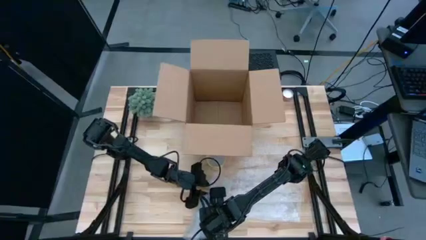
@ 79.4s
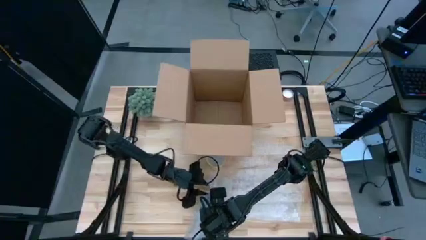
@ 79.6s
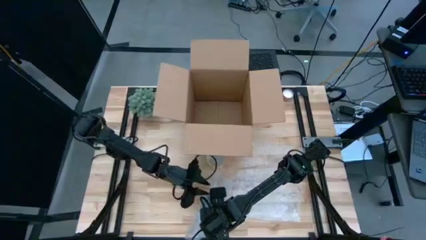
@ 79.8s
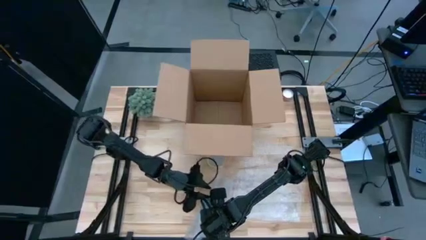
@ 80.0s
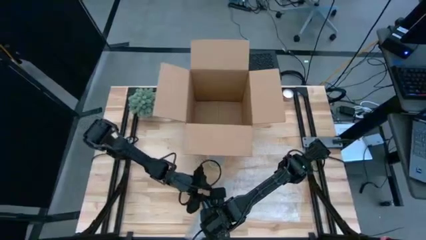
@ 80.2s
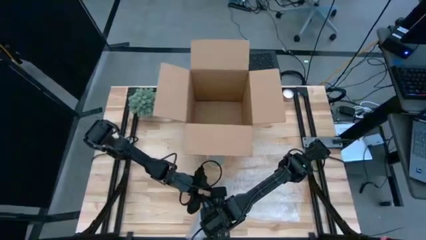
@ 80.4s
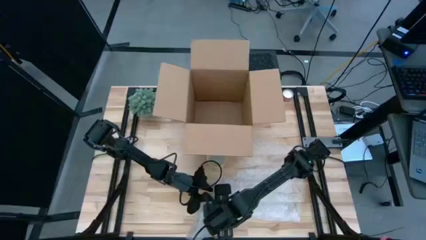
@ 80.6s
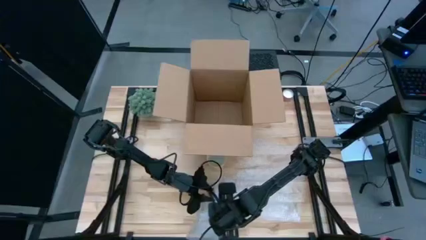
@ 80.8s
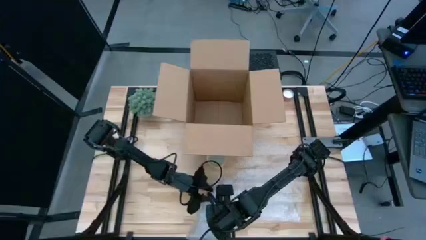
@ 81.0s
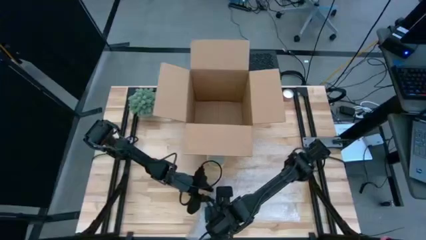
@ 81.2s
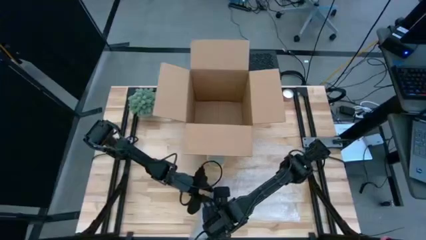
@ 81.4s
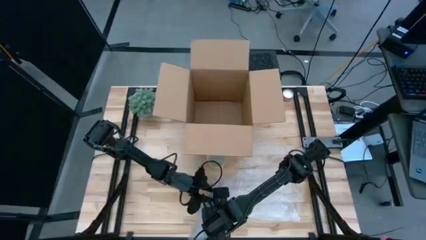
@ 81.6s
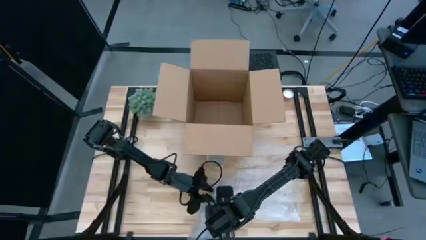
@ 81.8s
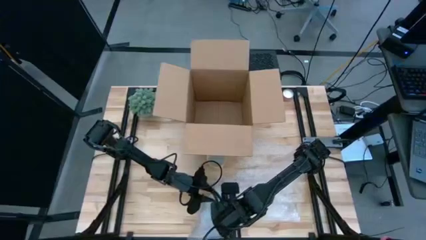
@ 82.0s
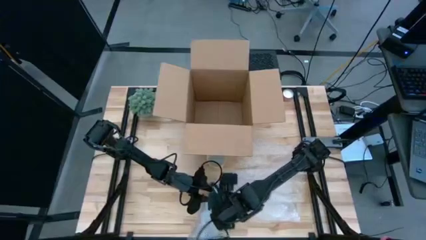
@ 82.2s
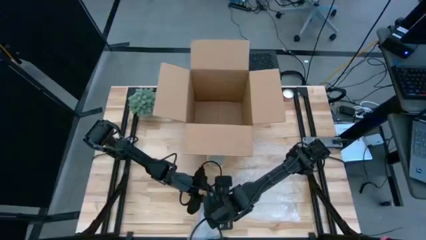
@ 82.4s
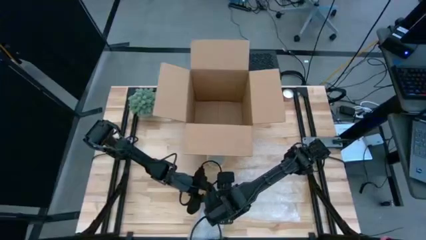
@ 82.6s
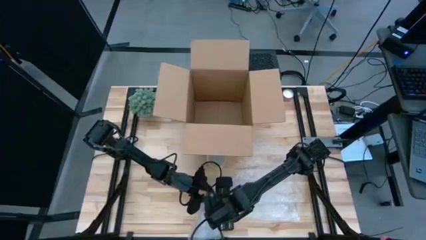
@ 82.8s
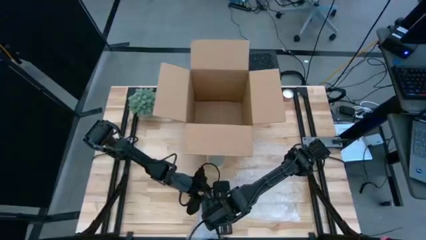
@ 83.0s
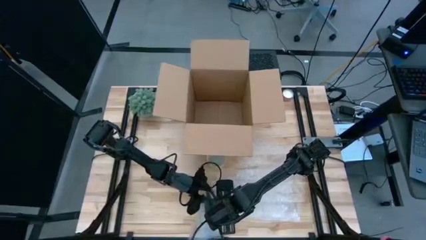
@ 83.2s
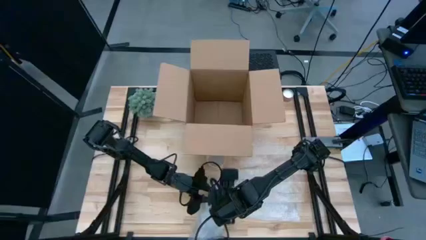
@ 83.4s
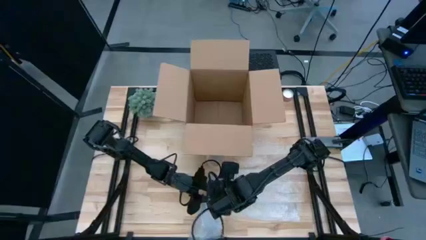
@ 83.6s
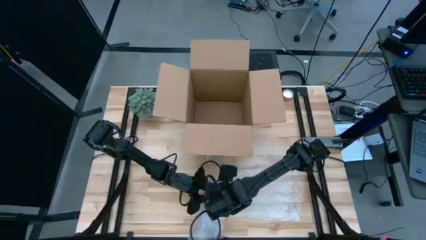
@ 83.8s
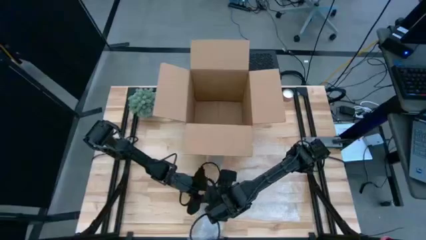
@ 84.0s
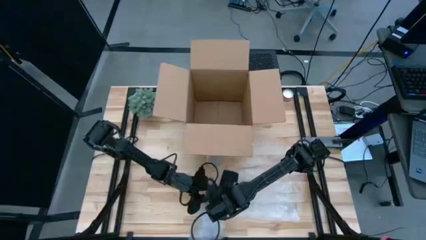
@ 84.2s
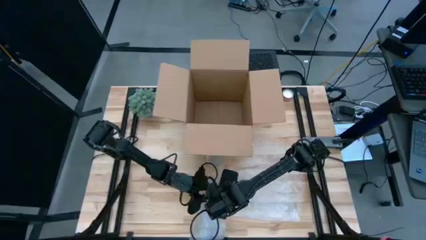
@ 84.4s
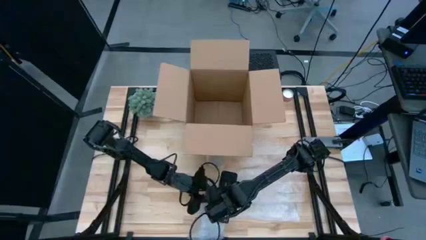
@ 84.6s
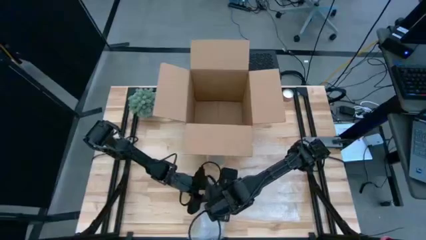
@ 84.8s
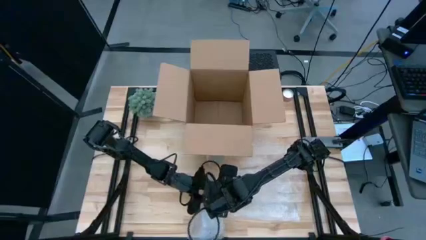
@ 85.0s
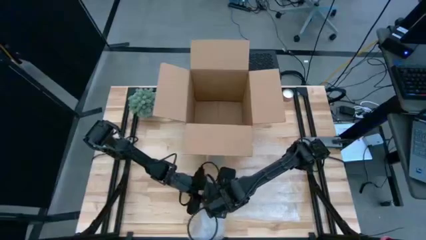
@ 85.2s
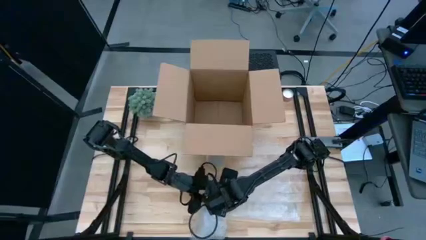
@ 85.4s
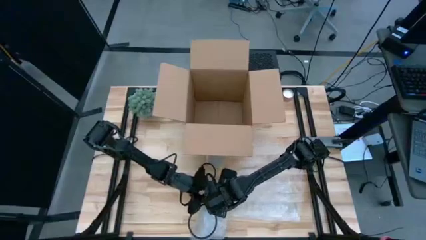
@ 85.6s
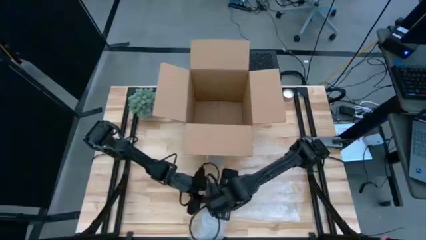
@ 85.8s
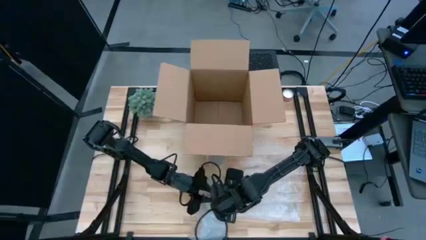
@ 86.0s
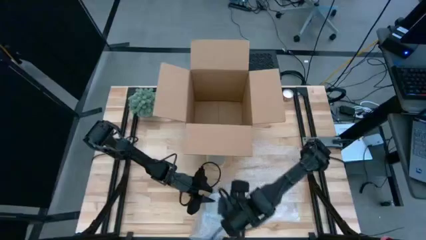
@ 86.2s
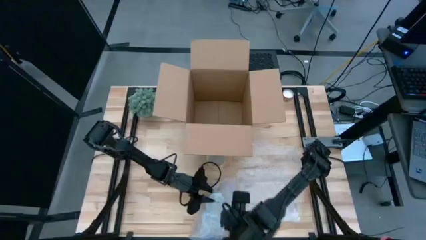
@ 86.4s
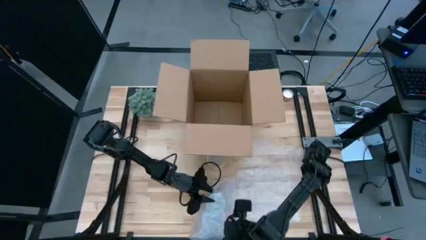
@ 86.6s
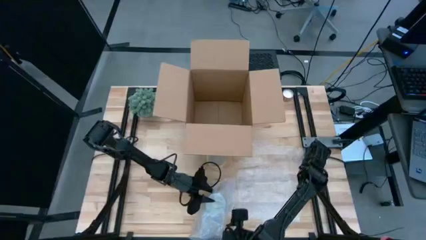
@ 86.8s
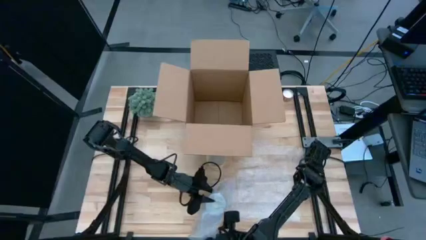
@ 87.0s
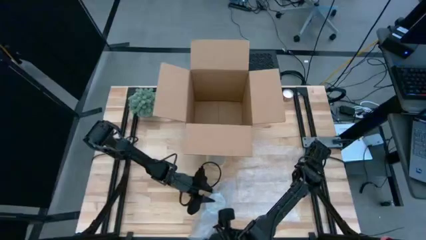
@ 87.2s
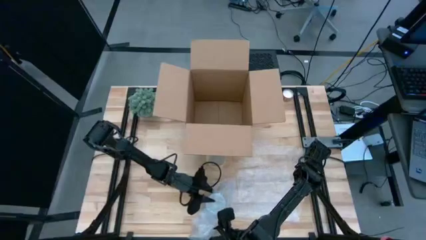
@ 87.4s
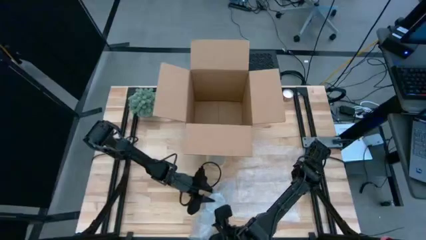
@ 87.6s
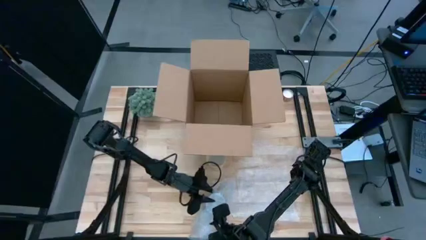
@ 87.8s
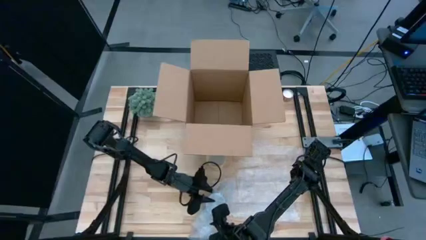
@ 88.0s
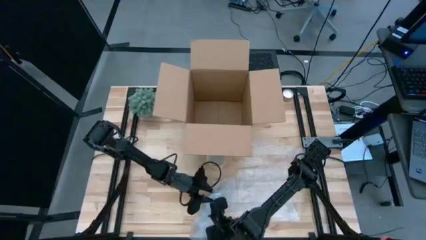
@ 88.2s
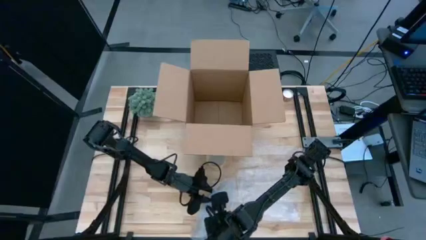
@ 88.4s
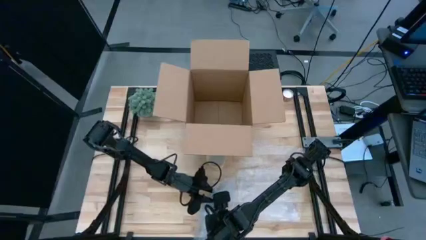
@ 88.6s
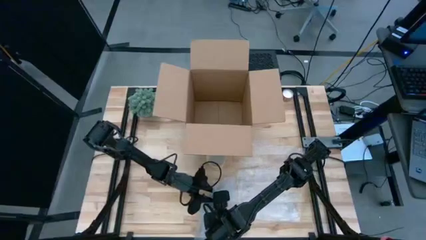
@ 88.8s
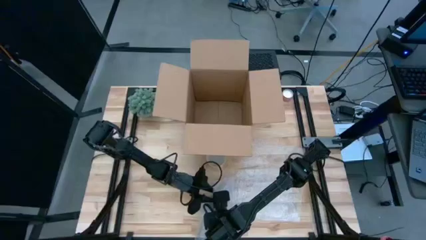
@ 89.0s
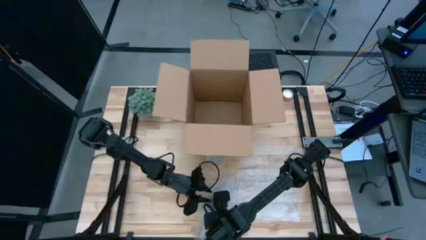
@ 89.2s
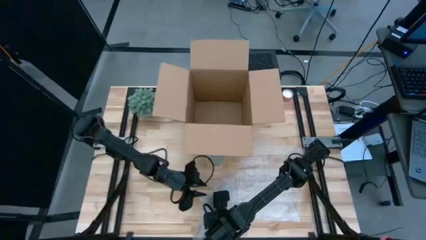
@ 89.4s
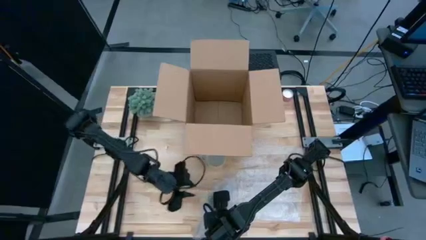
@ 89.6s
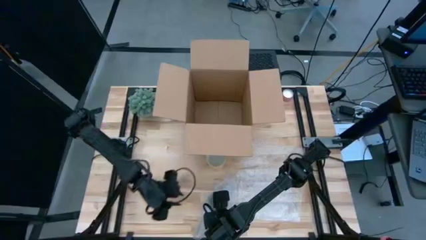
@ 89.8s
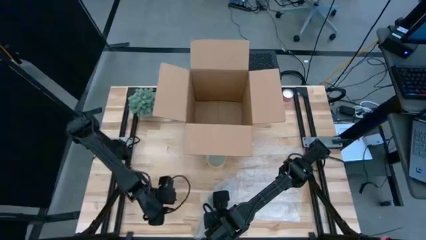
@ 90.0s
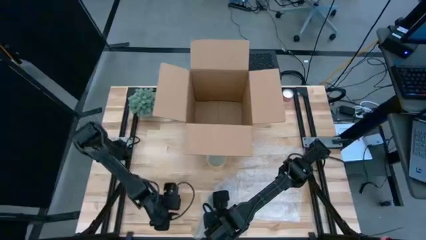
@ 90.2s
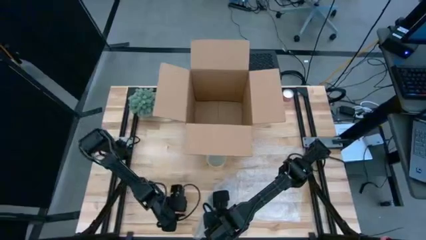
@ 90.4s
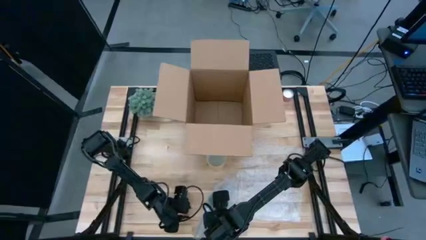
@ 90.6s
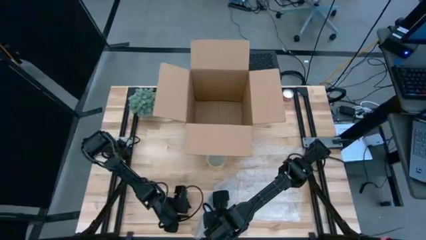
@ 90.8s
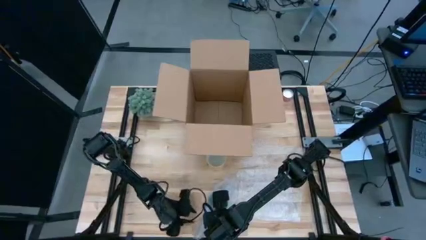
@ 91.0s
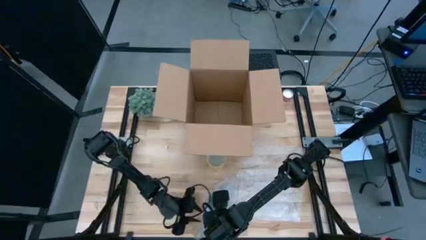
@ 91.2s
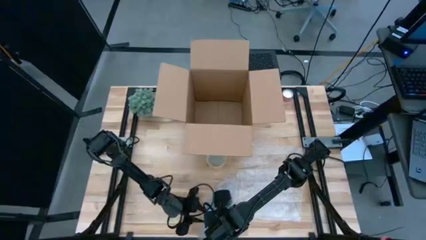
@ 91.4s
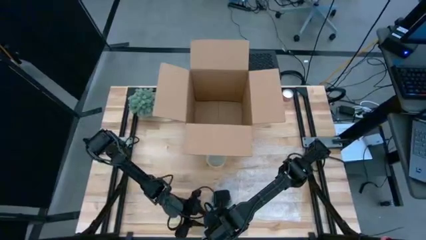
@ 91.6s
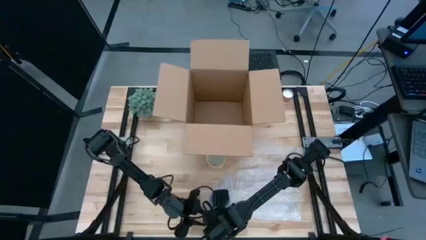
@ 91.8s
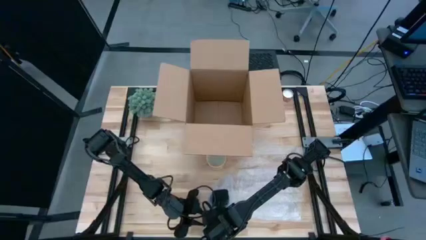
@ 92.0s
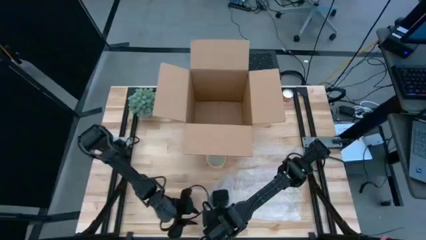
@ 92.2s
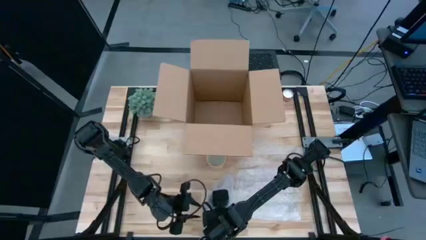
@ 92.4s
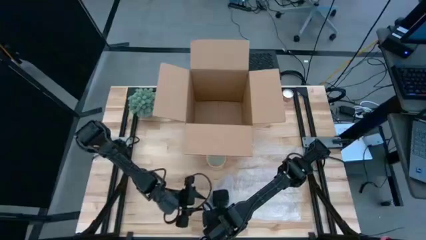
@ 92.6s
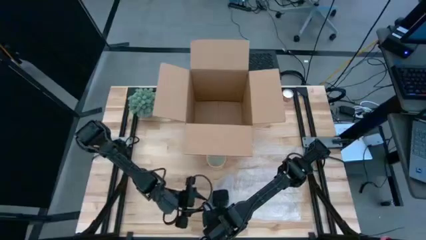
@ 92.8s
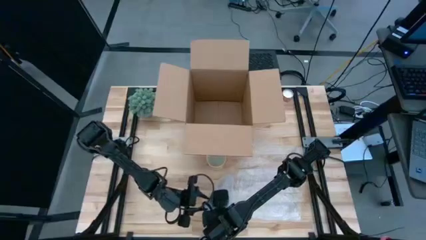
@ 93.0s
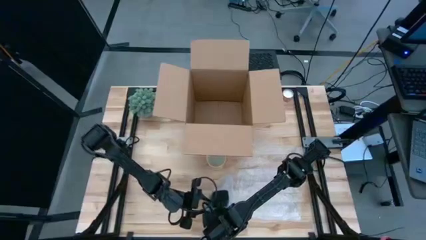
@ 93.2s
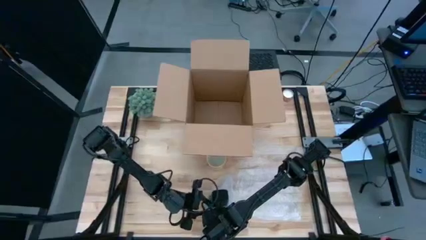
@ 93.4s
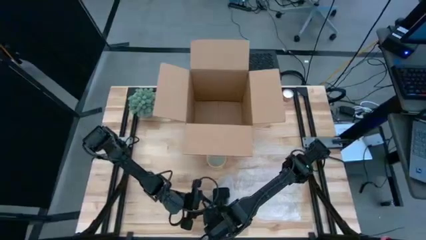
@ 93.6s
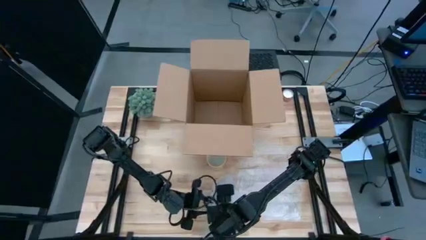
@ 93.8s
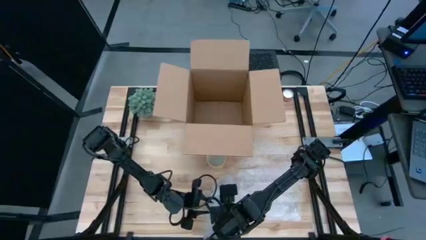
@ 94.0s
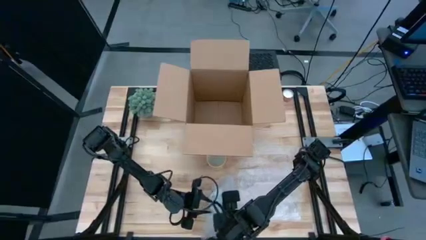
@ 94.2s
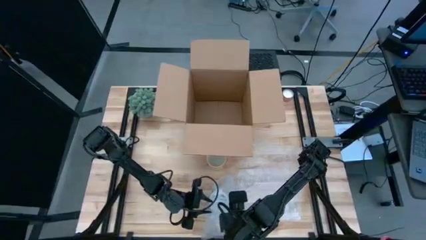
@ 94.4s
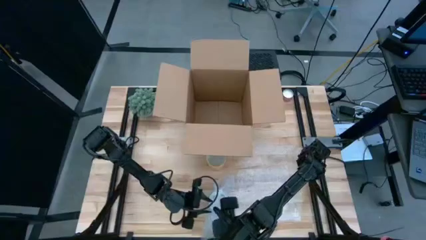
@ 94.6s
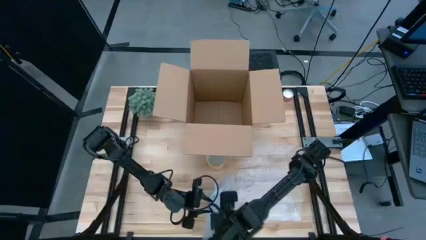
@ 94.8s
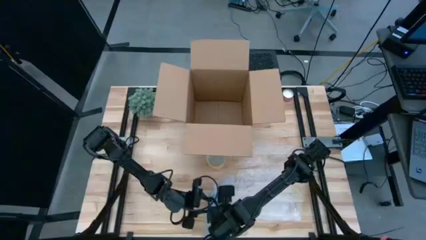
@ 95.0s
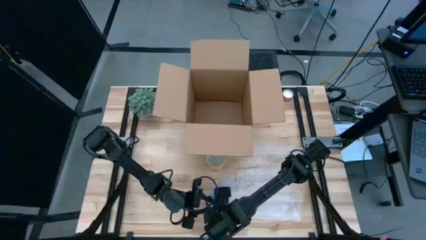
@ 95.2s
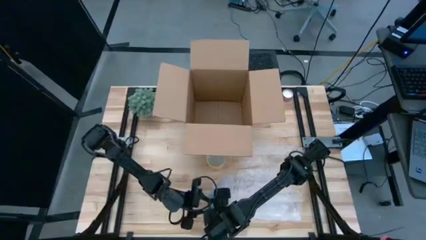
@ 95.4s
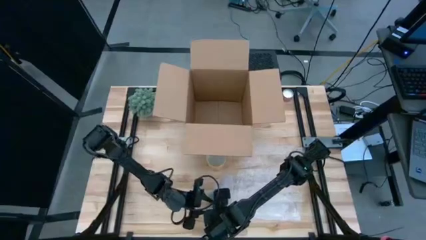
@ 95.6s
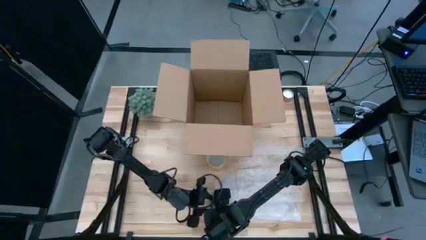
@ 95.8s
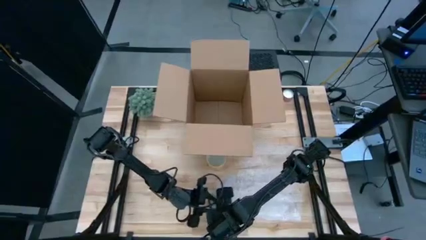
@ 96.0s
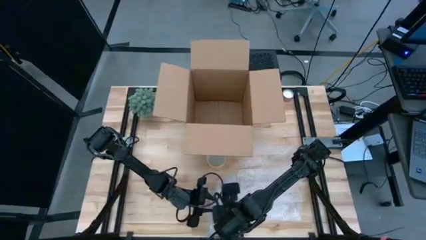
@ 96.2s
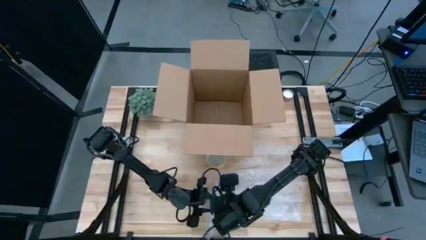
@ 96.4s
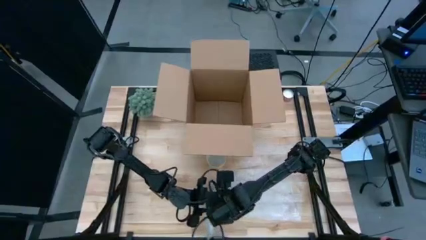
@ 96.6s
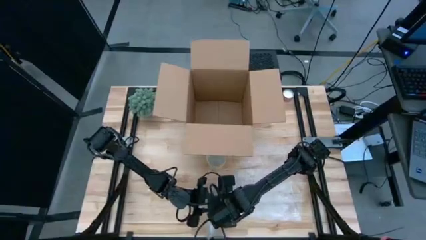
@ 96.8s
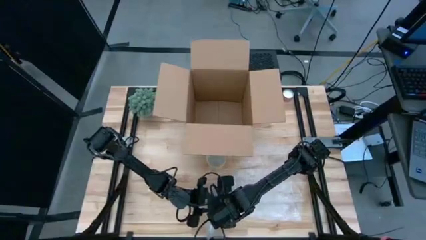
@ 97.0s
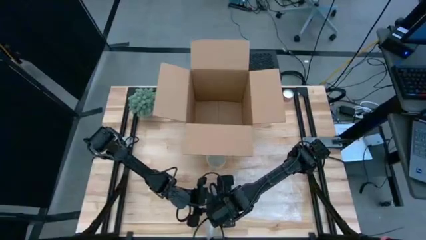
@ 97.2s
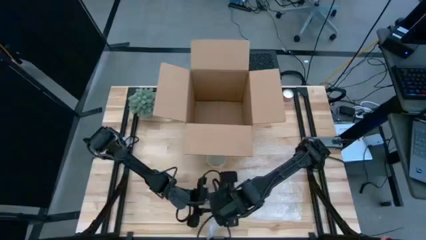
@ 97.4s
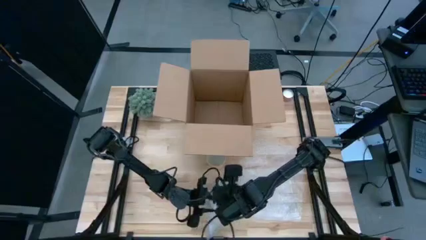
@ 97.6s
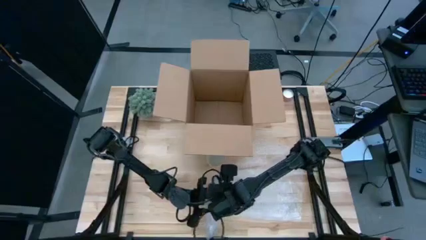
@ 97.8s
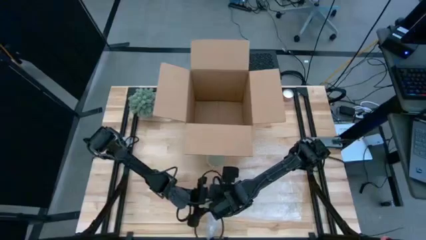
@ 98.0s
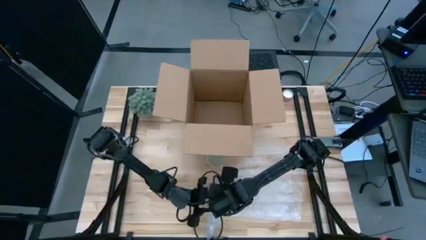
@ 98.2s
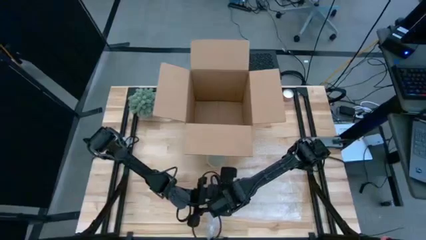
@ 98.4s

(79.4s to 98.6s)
Task: wrap mug
Wrap the red patterned mug with bubble wrap
